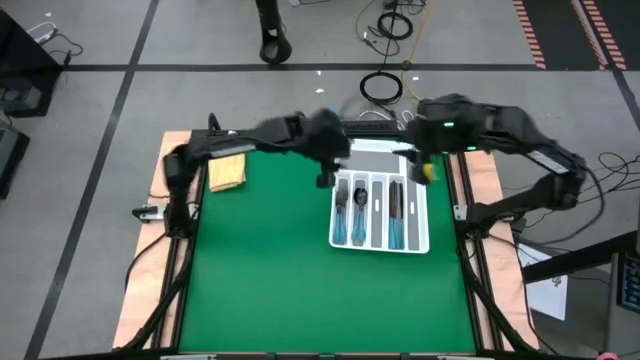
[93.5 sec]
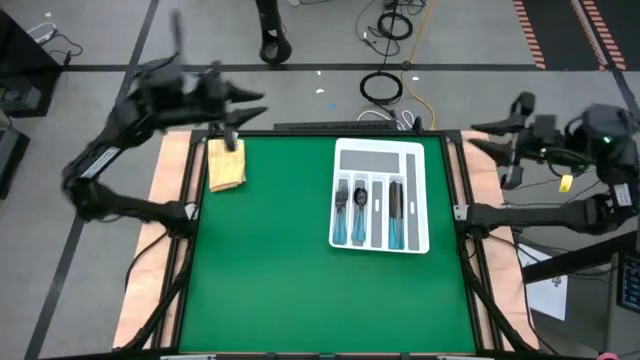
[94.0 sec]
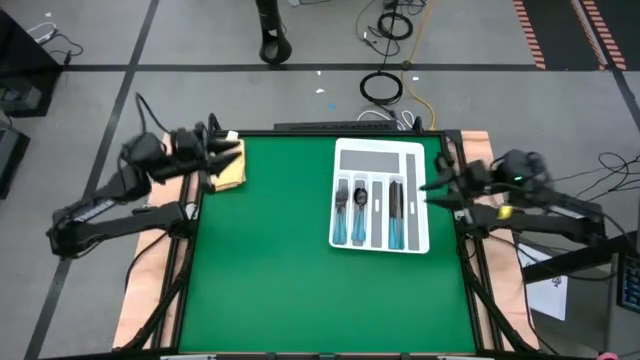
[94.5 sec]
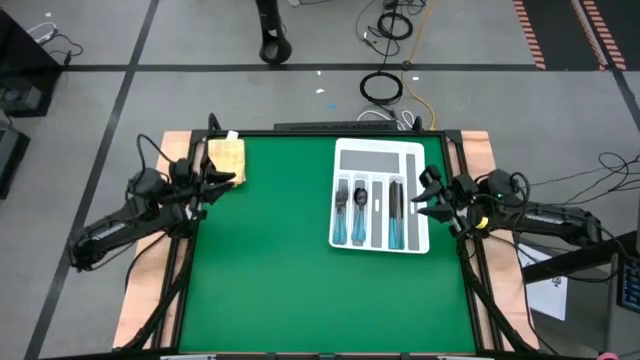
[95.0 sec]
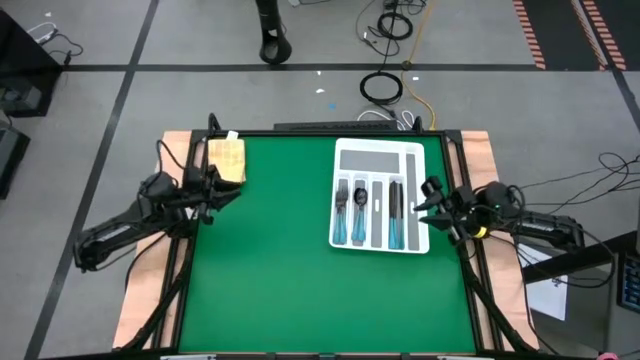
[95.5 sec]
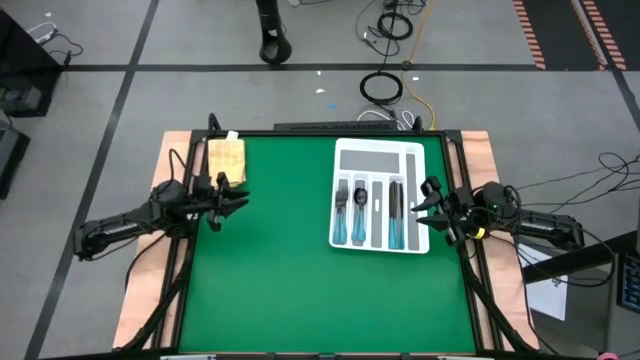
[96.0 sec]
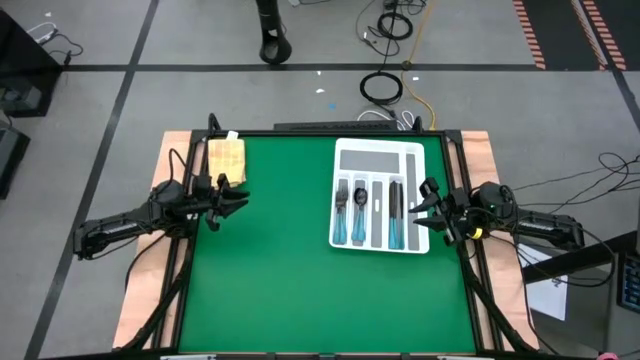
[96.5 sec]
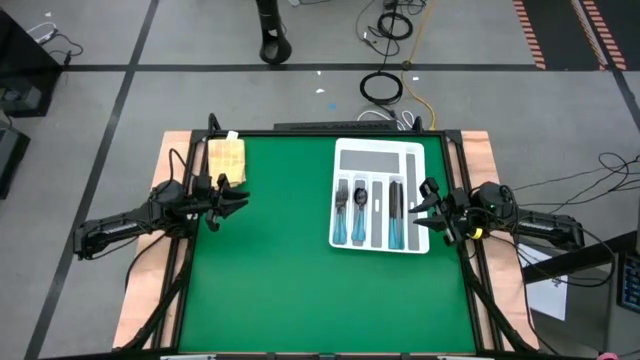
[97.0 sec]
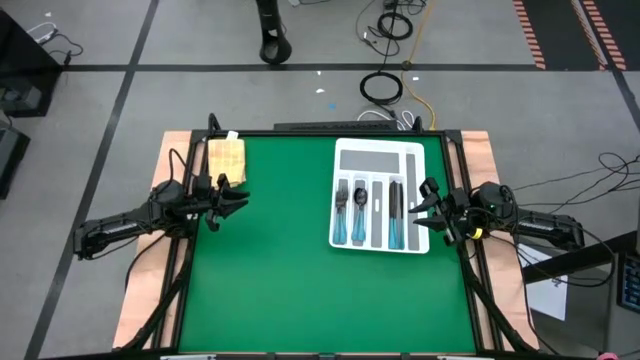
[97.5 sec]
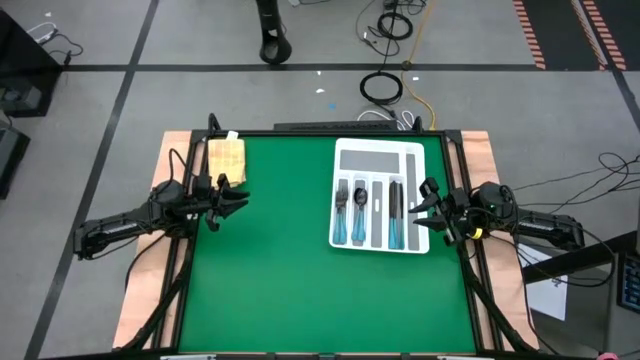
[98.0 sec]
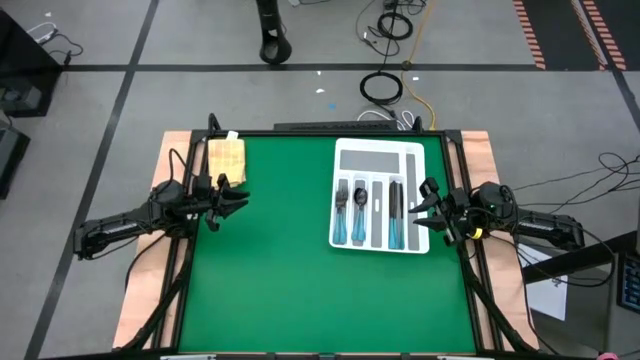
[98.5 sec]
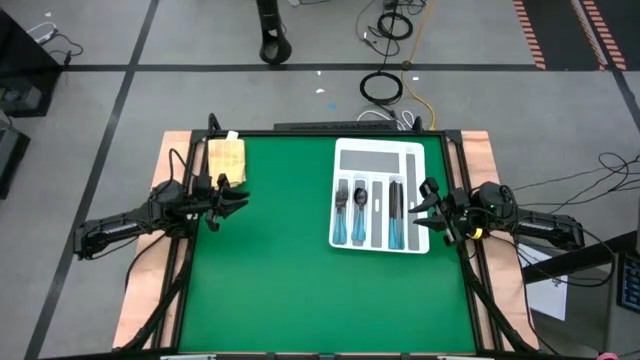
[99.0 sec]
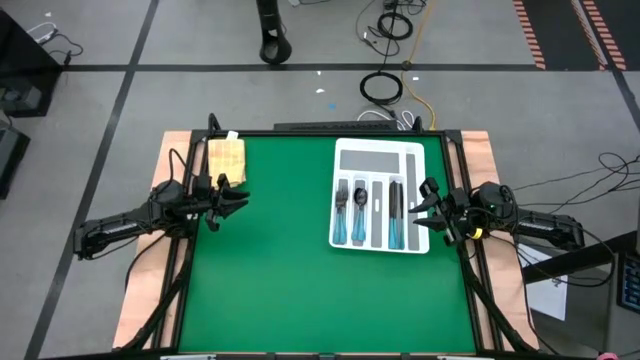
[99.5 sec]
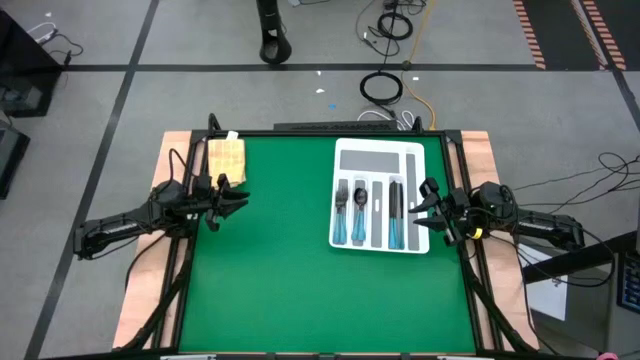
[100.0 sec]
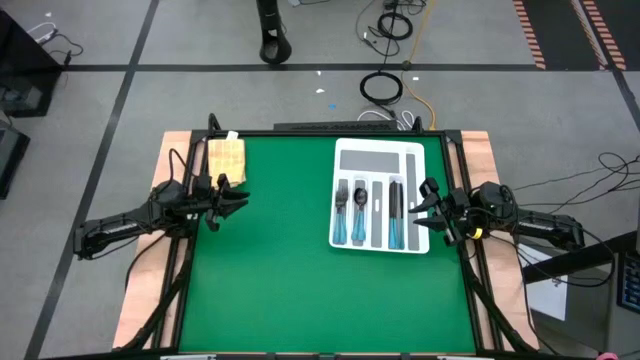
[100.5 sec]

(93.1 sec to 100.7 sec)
Task: Sort silverware
Return to Home Position

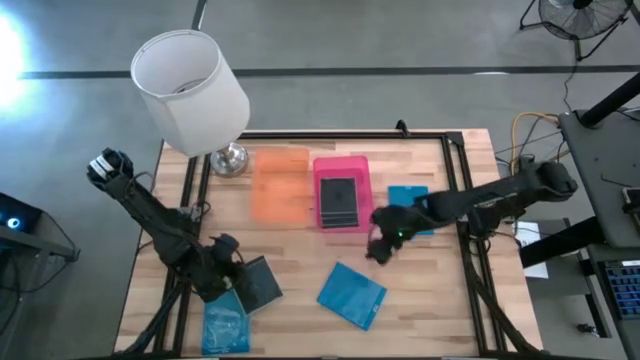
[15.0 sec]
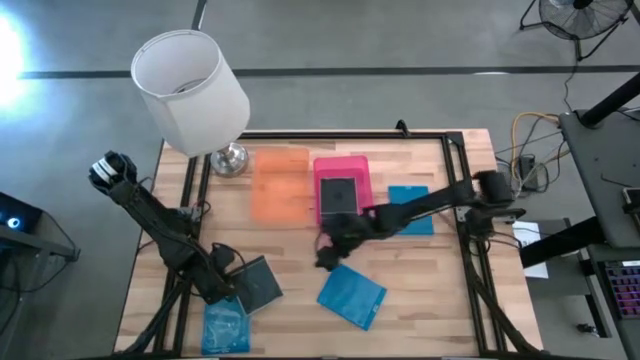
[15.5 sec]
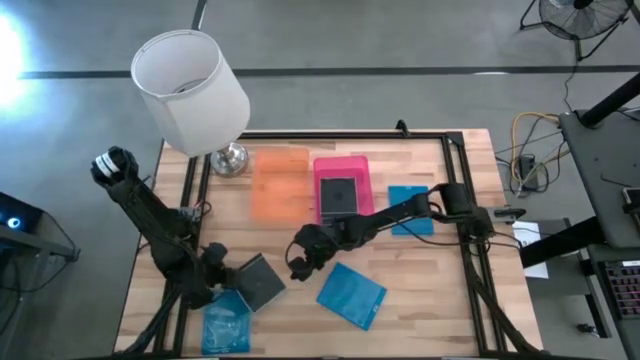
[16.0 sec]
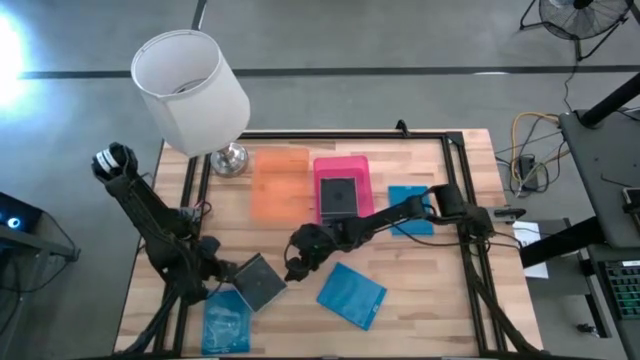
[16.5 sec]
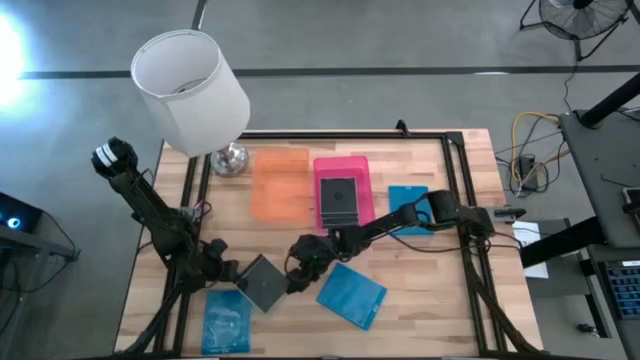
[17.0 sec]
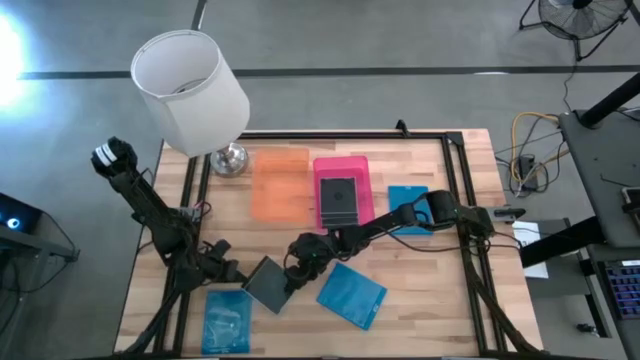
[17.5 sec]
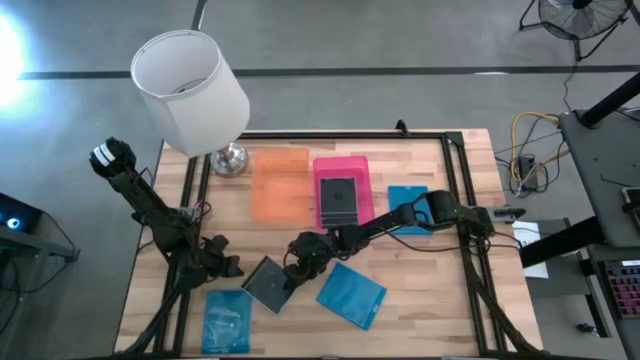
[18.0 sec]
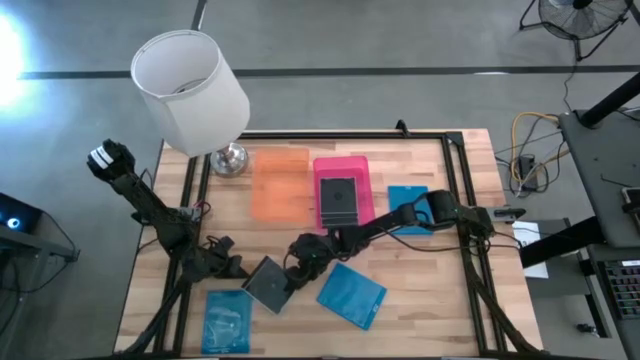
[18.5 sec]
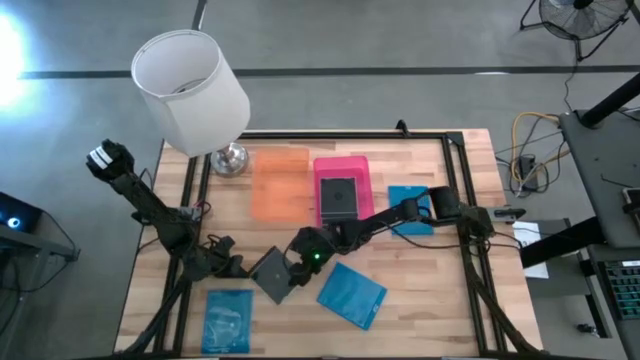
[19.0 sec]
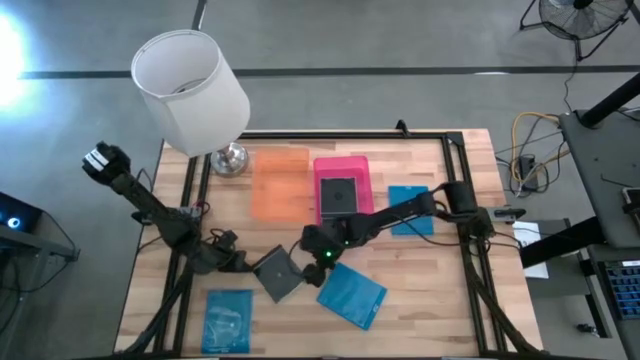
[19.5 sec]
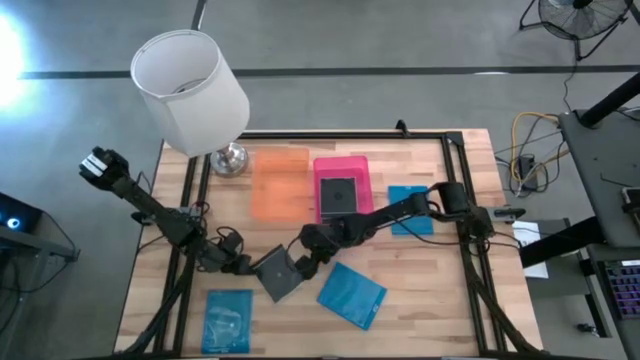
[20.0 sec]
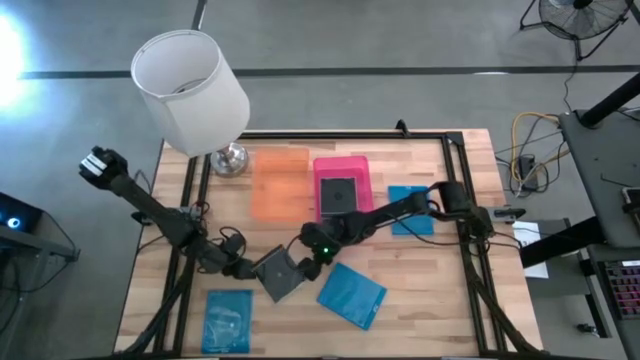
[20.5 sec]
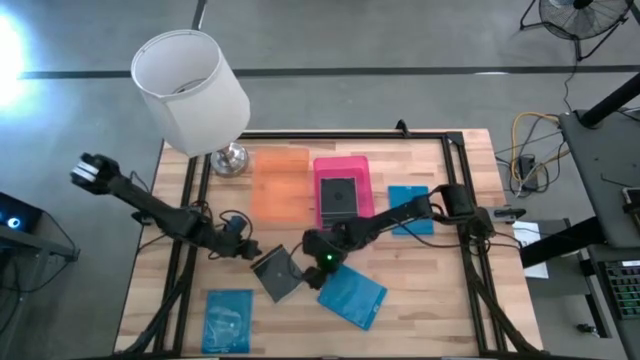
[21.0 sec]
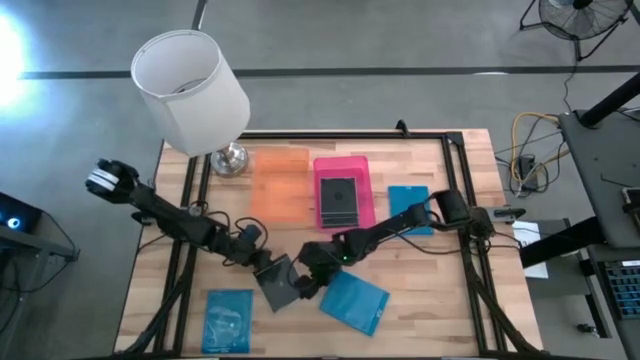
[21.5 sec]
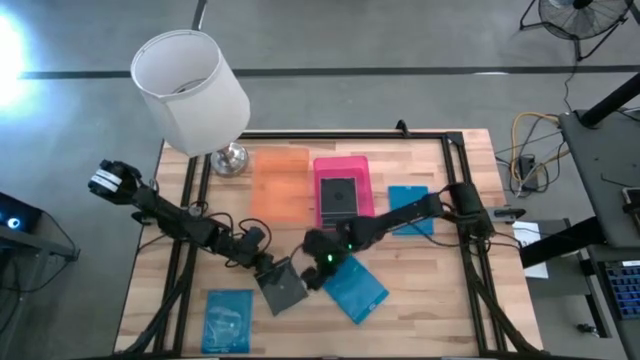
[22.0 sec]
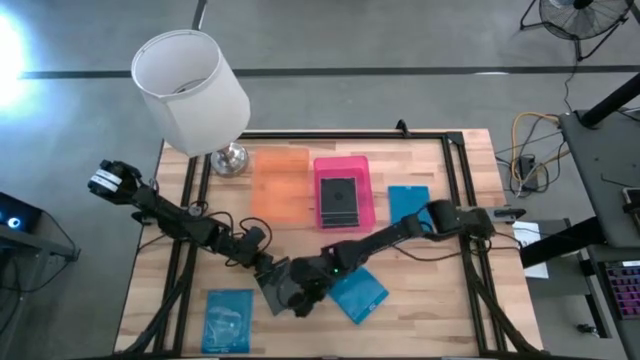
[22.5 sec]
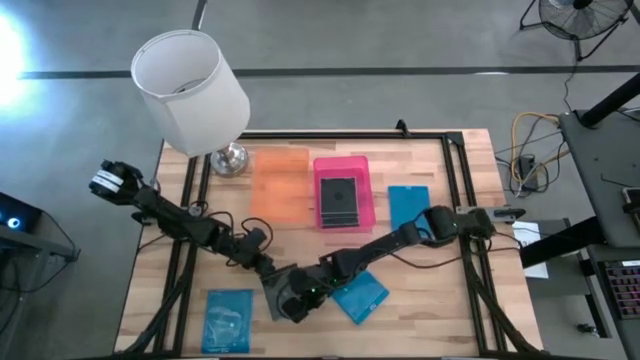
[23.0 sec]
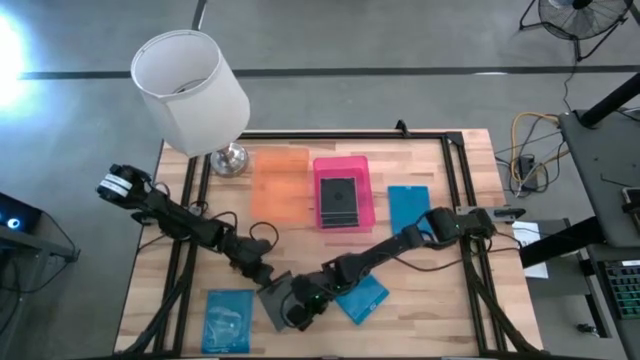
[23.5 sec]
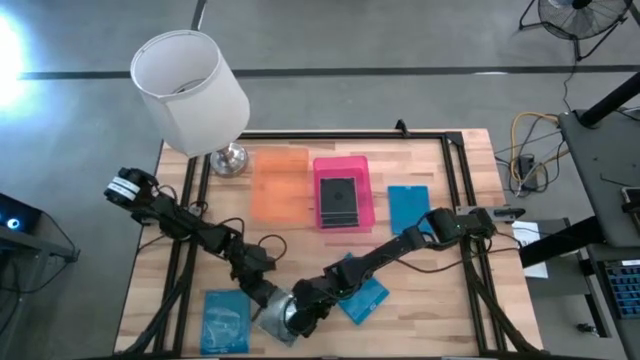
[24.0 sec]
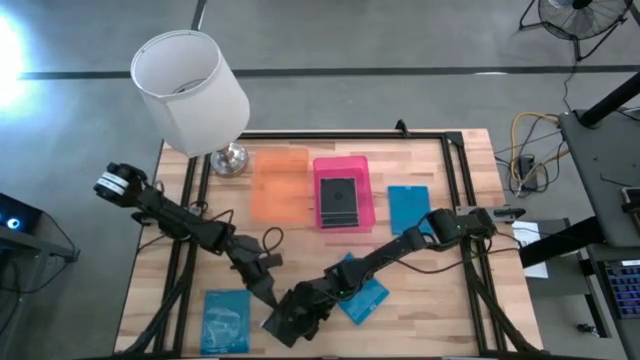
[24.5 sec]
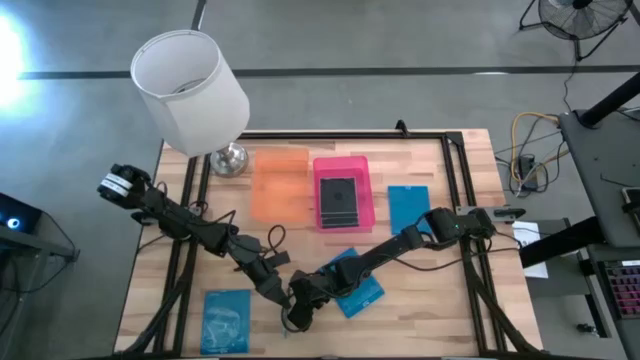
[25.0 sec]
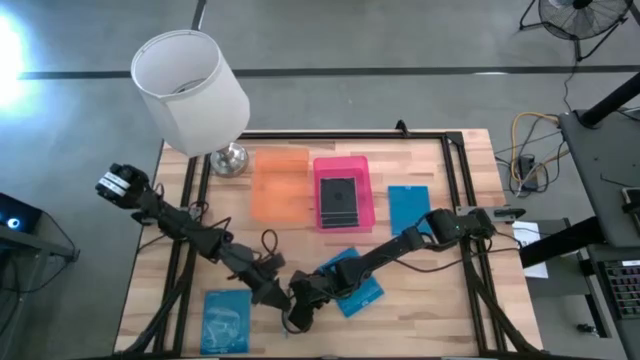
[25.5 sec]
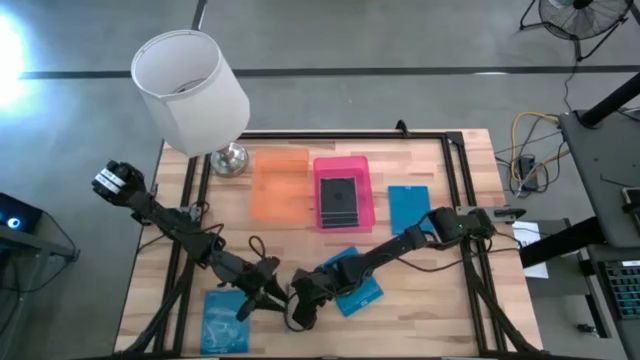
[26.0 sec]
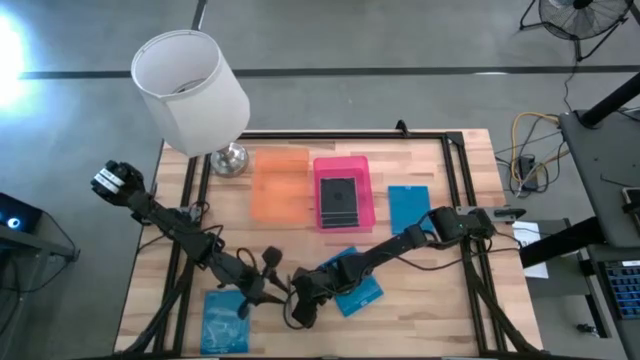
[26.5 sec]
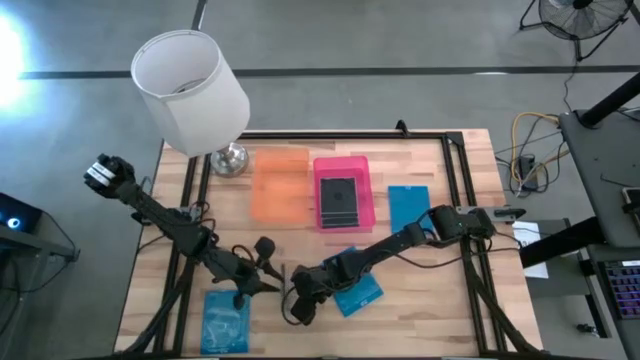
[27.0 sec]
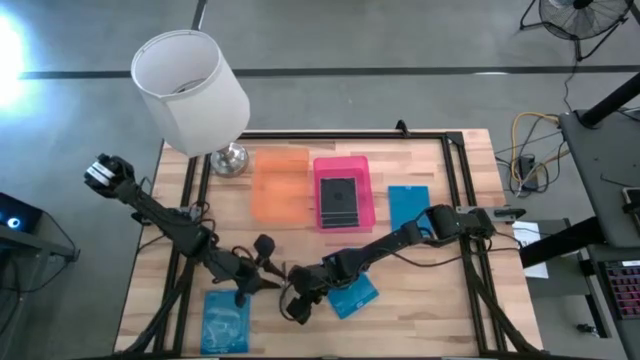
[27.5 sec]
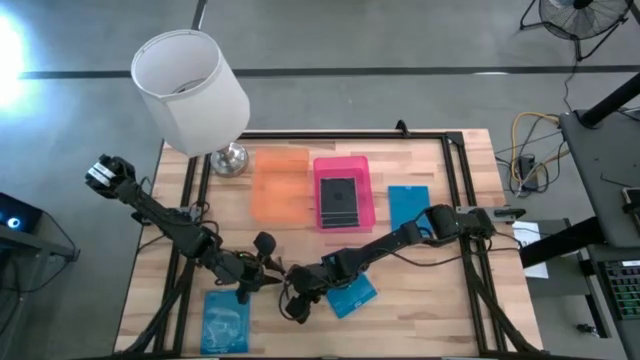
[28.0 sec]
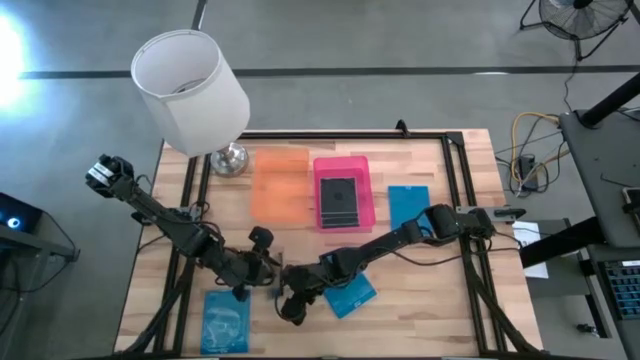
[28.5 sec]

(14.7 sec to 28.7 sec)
Task: Pick & place jewel cases by type
Put the black CD case into the pink bin
